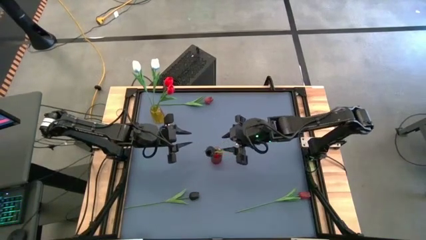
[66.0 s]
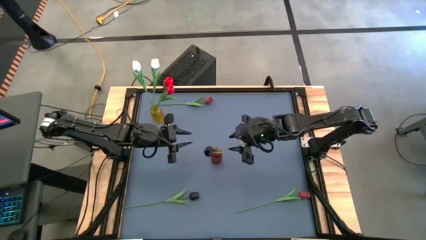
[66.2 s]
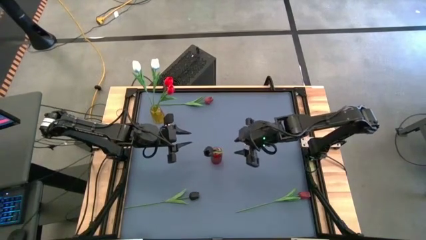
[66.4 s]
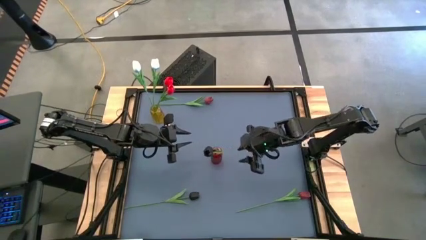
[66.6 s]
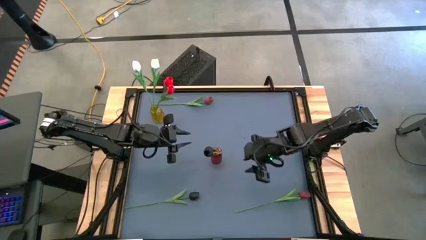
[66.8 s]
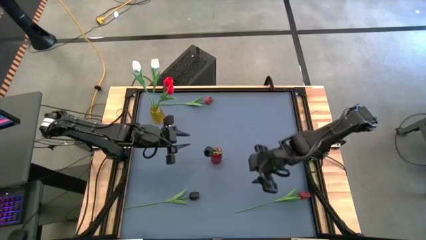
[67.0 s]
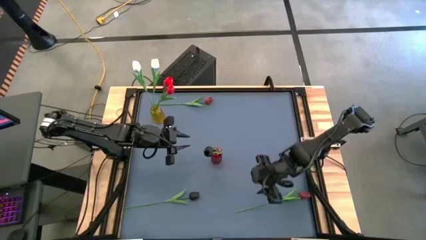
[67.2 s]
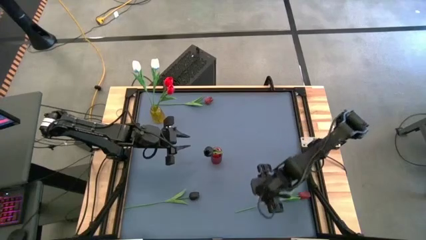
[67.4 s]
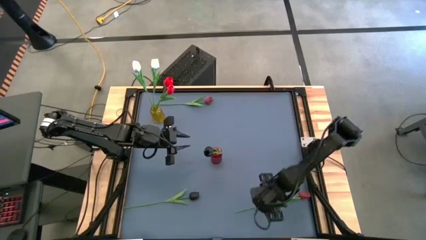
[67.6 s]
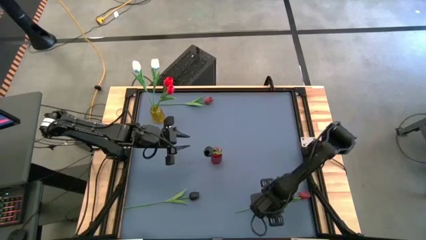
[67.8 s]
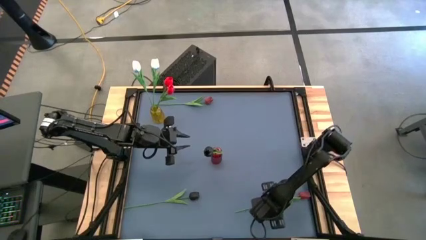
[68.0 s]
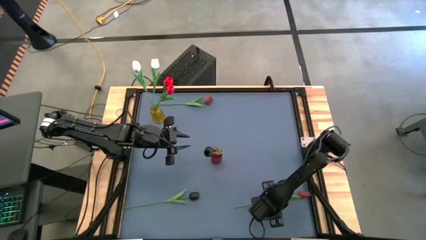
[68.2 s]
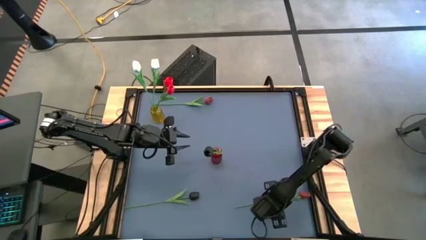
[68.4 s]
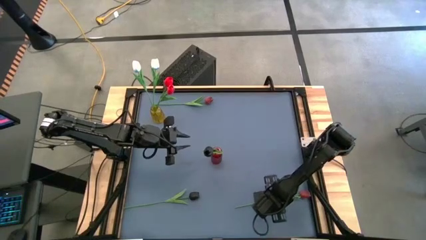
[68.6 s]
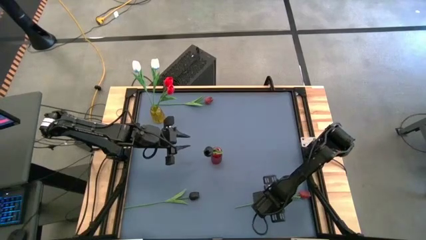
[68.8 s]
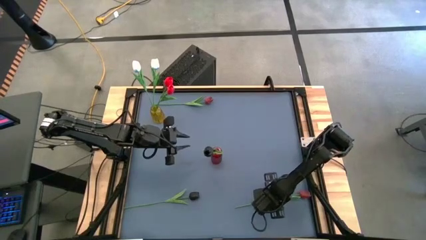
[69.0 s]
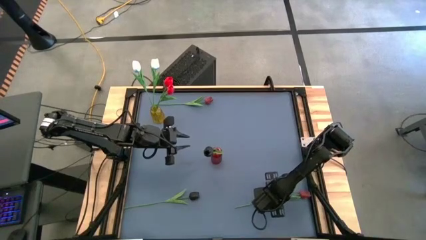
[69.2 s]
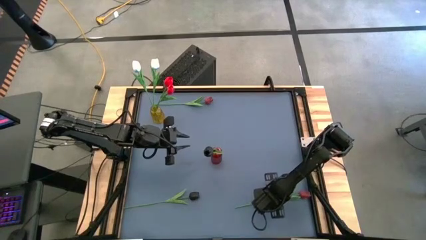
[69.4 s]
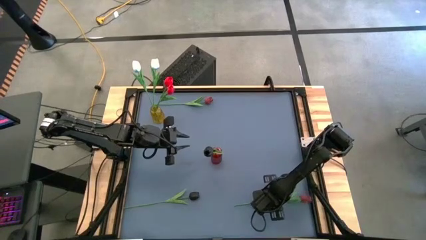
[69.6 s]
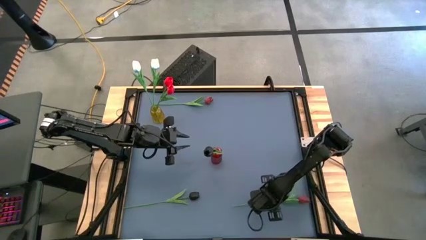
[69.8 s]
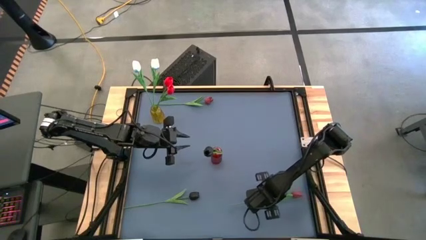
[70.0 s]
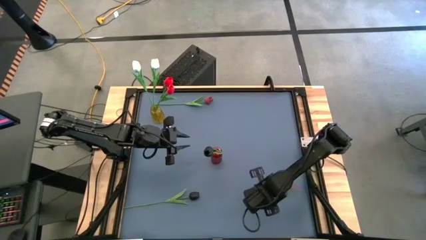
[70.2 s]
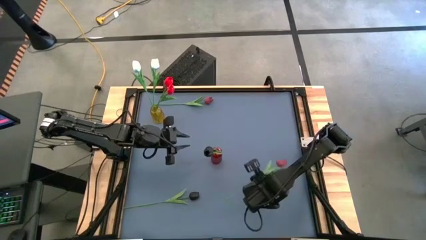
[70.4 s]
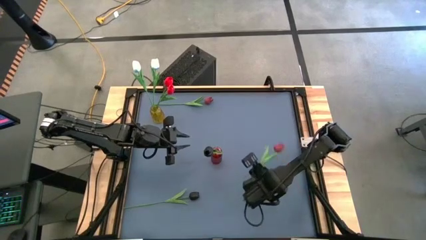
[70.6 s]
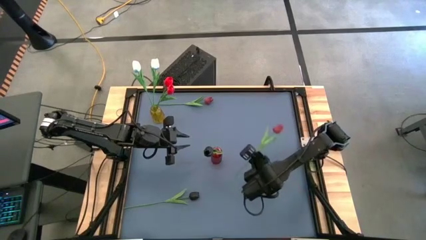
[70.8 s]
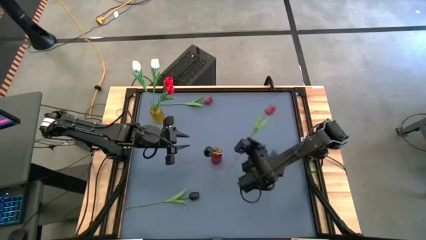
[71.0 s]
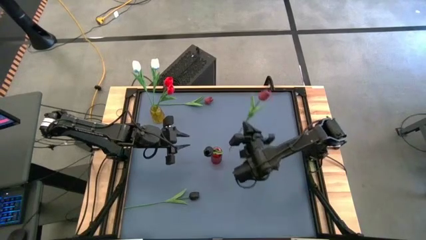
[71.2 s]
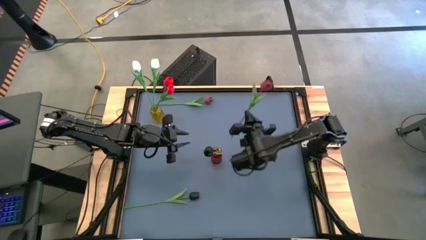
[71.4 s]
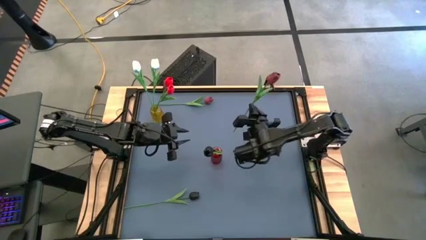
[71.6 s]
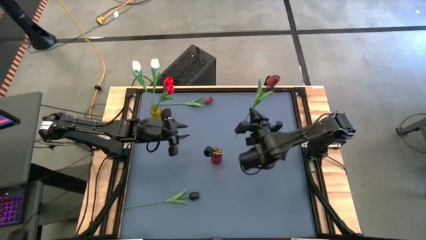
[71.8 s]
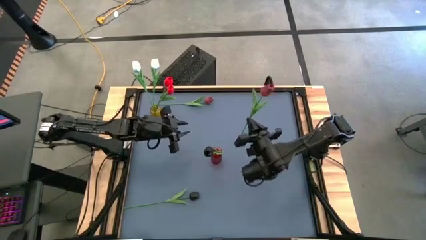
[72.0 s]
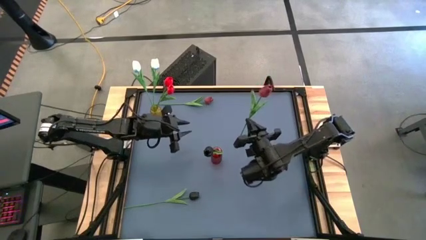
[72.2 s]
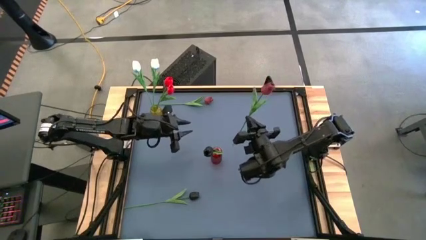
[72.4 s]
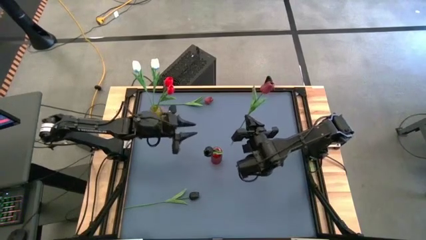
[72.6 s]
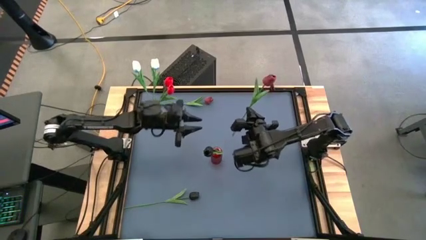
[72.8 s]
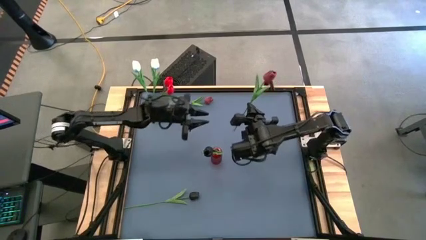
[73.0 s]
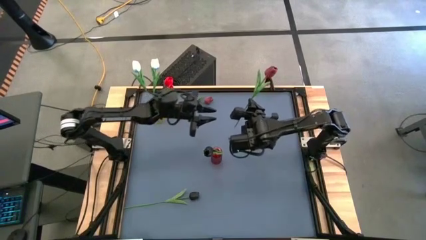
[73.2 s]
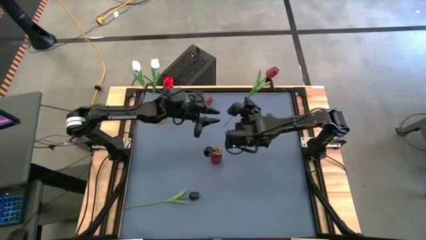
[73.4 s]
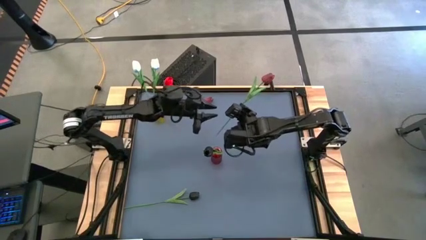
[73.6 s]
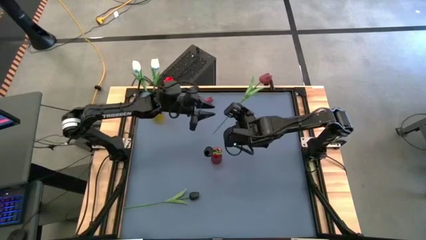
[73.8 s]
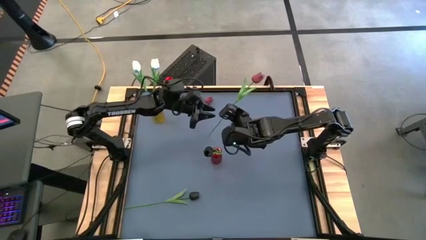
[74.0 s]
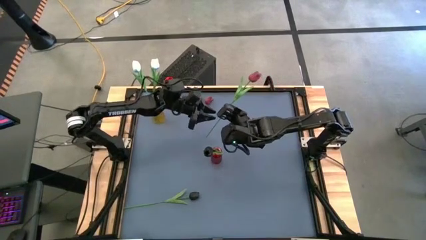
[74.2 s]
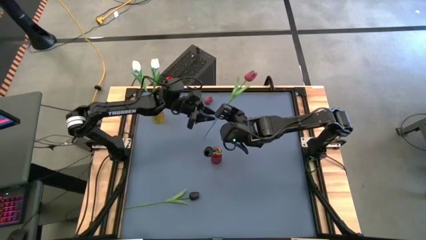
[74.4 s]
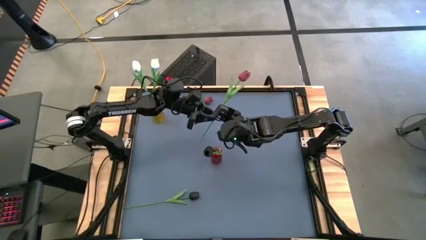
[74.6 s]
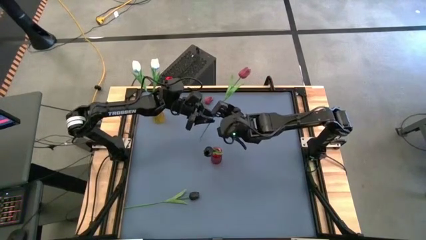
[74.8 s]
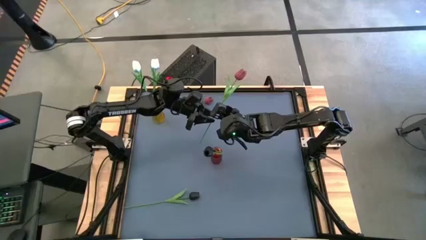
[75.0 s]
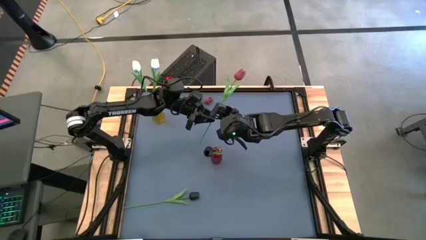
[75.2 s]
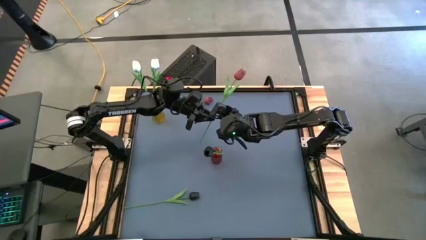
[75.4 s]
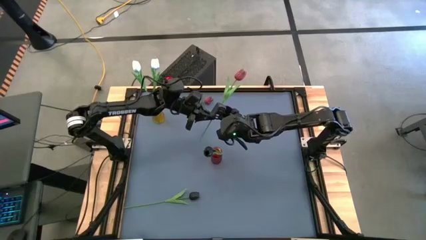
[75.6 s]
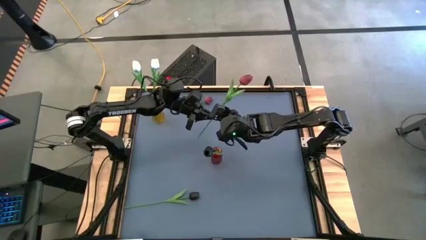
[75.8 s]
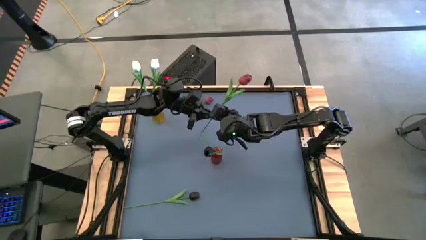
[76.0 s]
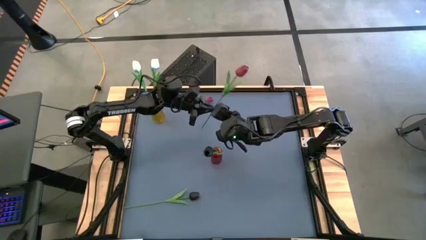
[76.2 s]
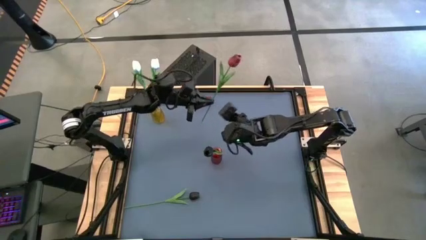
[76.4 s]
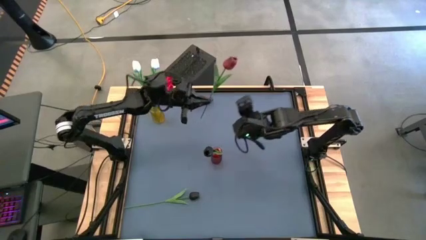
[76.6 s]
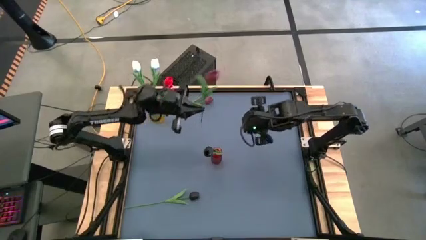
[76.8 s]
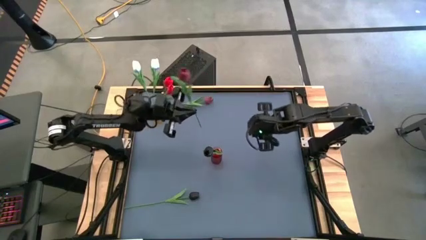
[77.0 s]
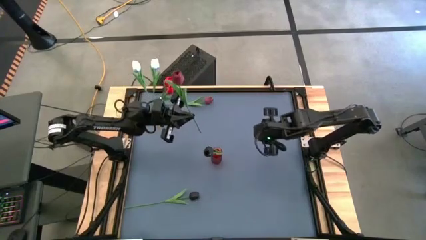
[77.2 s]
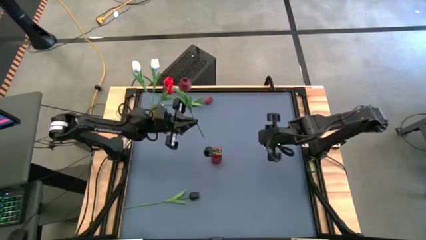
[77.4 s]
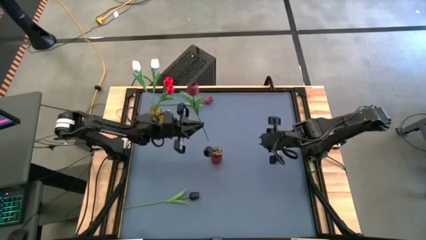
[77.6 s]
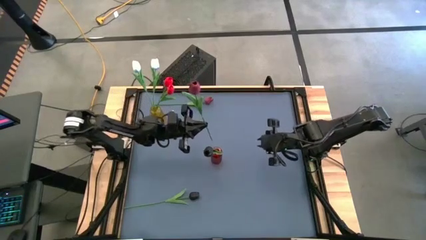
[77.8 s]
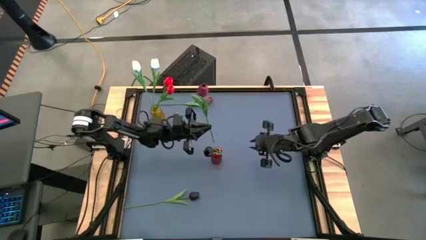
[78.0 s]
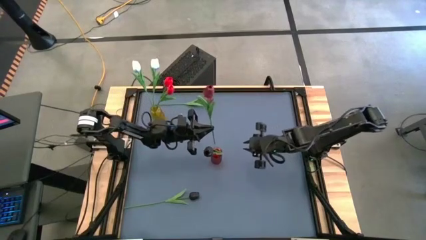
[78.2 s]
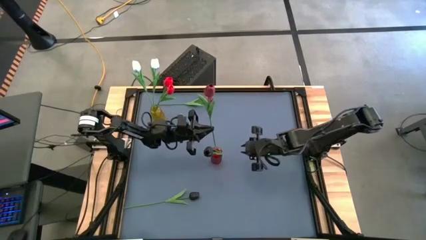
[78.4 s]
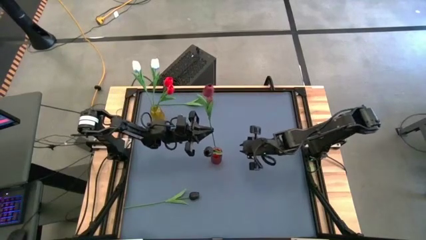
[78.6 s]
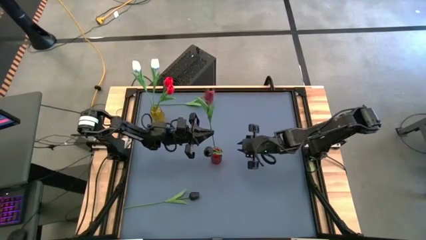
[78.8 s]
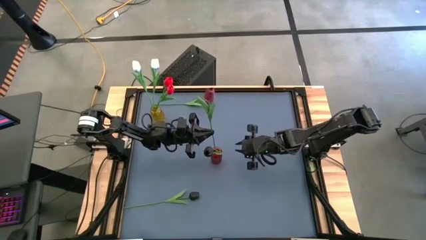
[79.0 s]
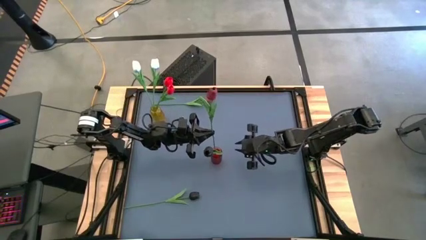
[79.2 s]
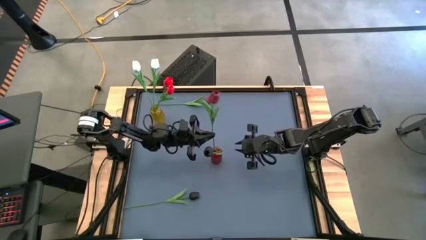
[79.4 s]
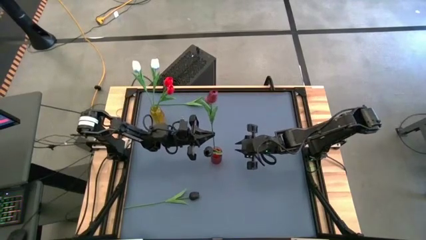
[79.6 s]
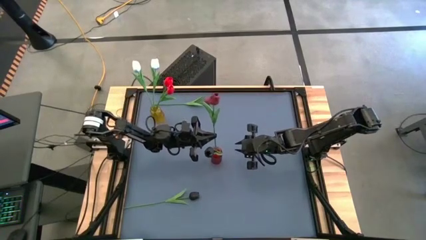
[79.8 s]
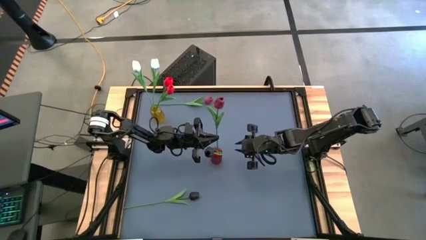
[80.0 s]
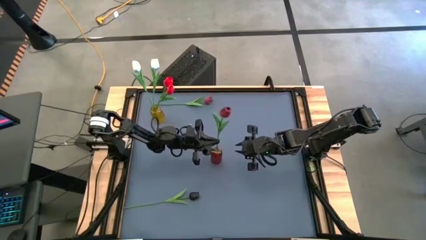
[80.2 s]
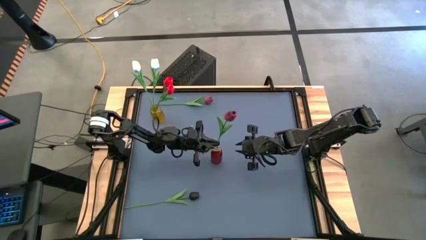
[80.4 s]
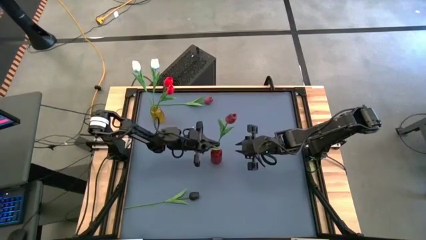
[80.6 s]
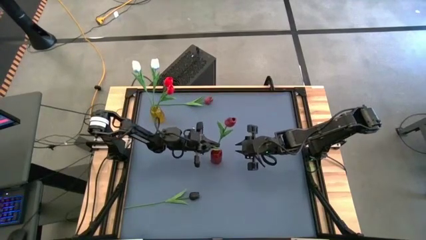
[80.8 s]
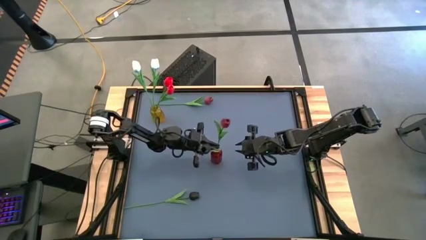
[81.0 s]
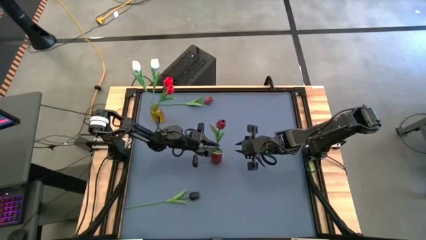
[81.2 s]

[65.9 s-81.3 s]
Task: Sort flowers into vase by color
Put the bottom dark red tulip into the red vase
